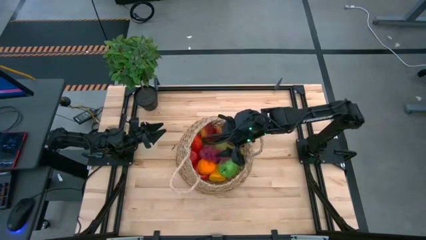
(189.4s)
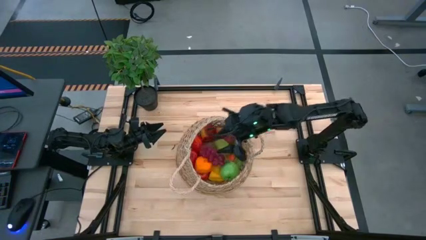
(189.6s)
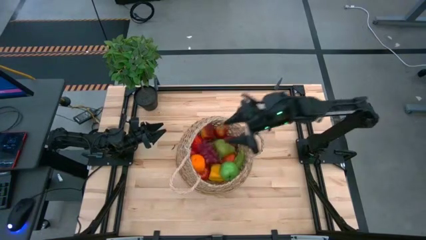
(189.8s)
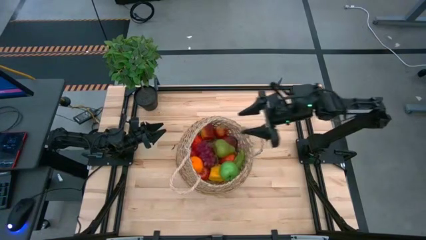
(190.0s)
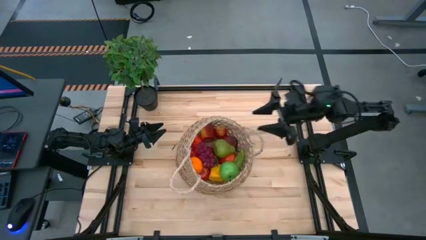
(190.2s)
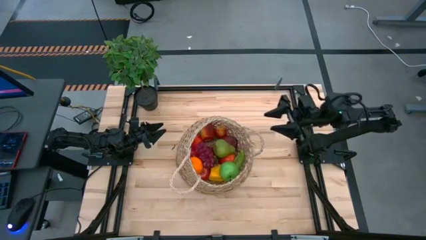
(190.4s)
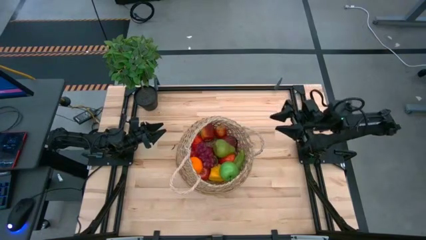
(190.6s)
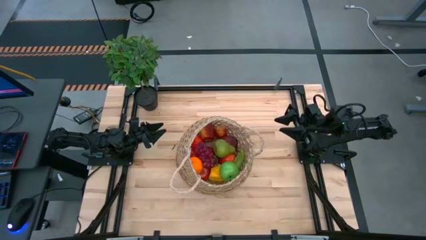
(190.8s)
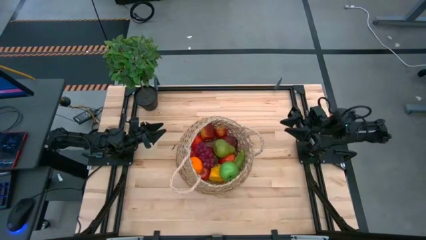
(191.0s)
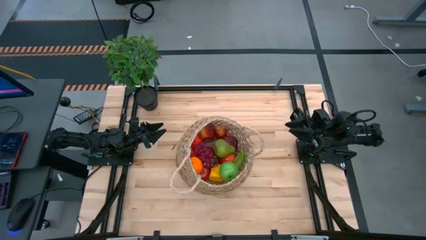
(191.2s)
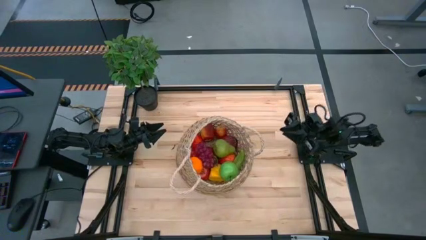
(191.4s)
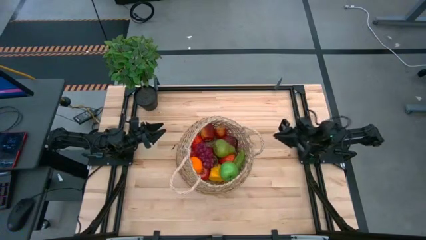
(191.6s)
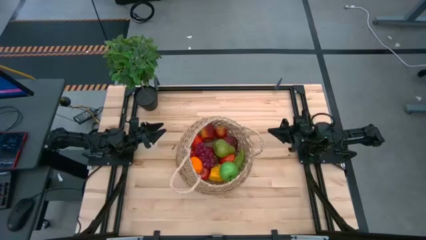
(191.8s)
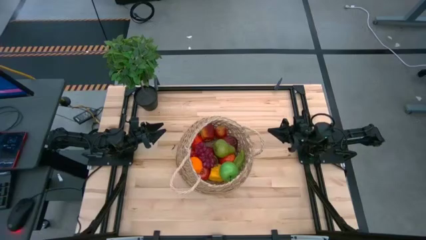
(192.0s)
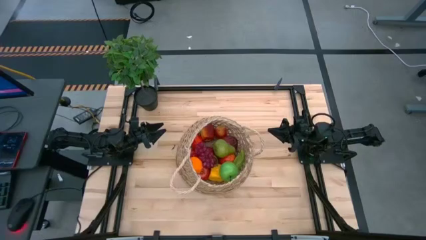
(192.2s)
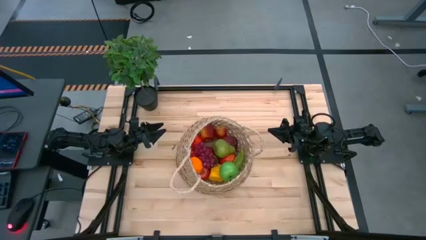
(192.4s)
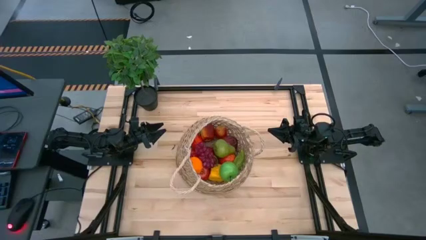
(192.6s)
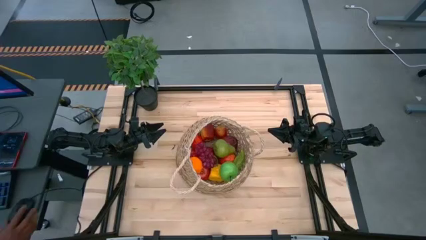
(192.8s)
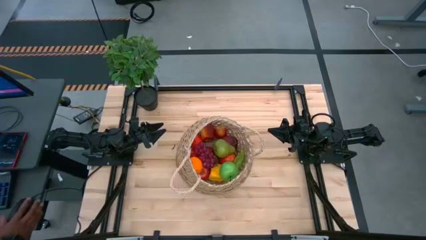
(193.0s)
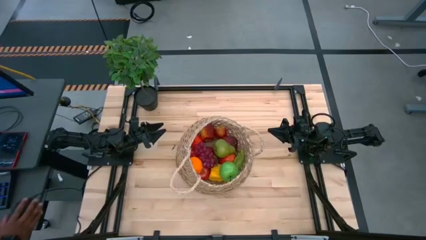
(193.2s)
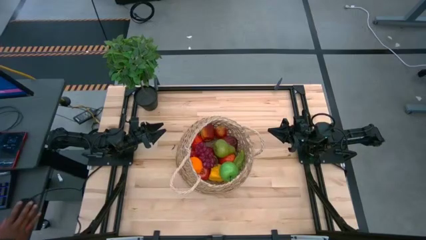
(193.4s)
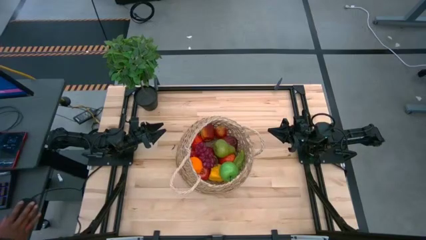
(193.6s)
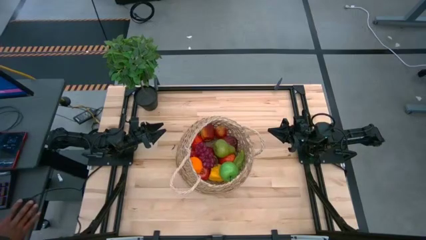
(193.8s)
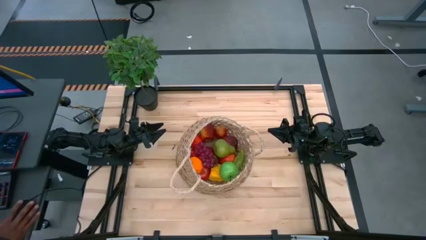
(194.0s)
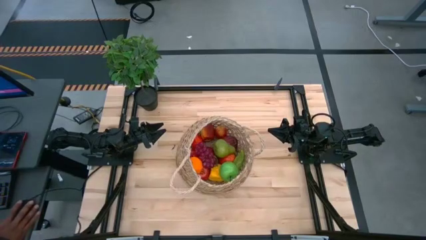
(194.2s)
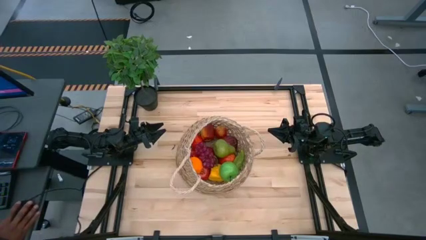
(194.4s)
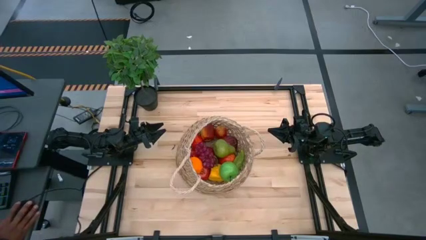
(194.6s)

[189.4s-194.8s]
Task: Build produce basket
Return to Home Position

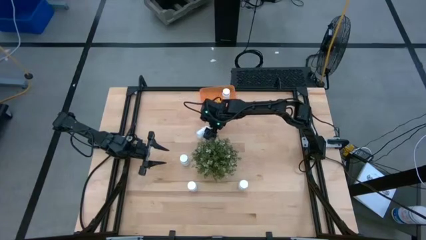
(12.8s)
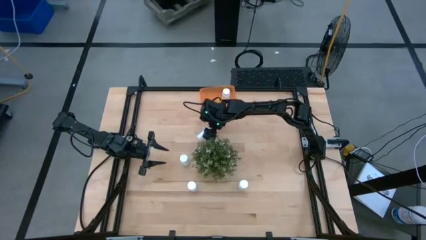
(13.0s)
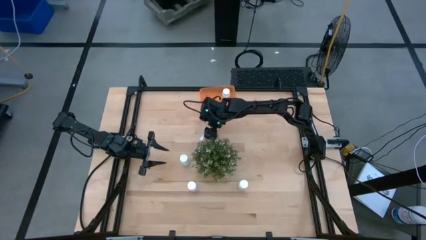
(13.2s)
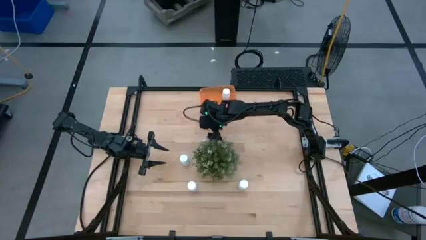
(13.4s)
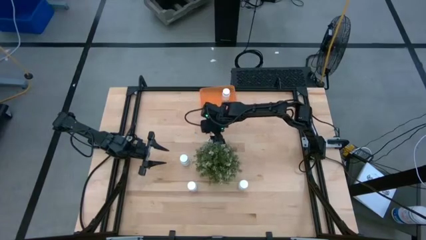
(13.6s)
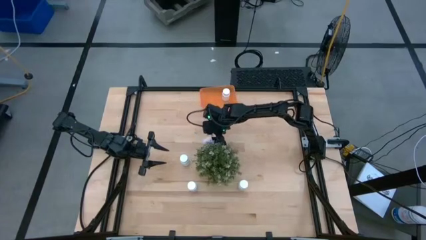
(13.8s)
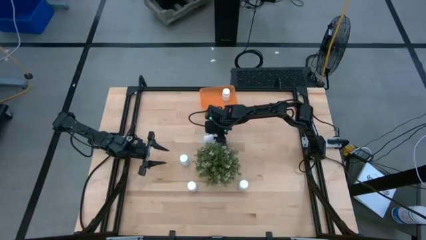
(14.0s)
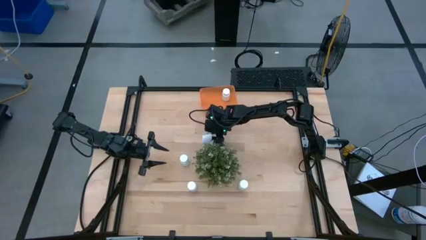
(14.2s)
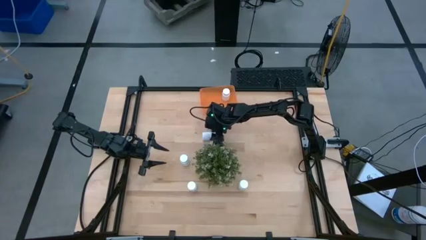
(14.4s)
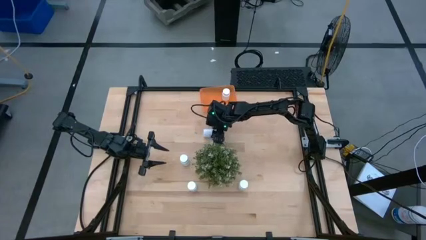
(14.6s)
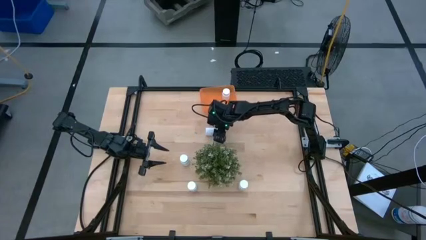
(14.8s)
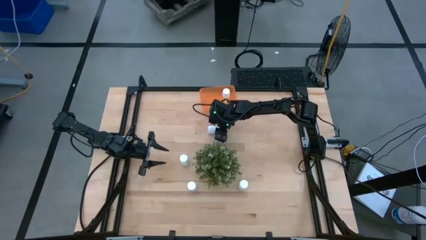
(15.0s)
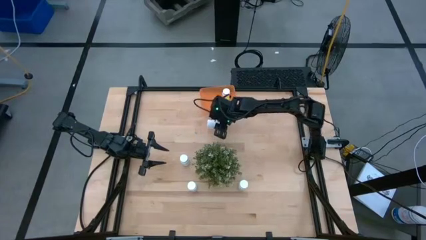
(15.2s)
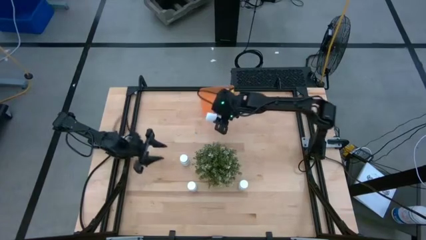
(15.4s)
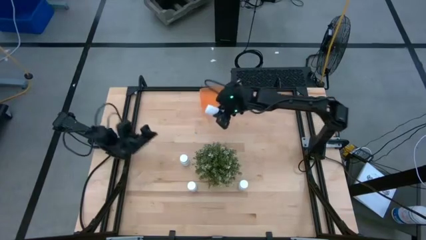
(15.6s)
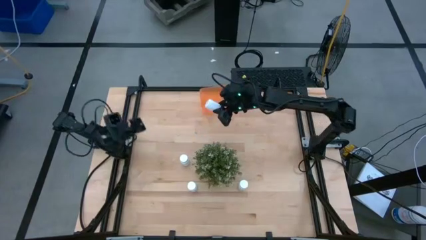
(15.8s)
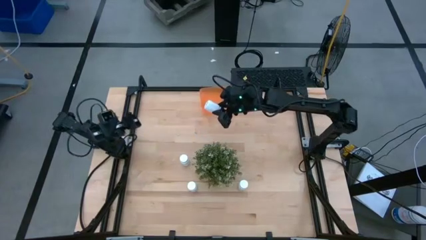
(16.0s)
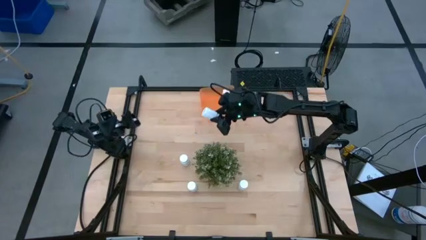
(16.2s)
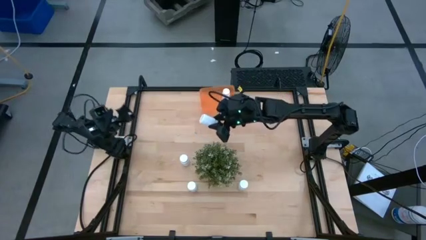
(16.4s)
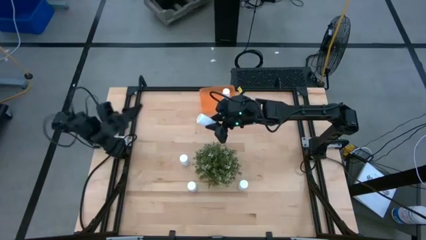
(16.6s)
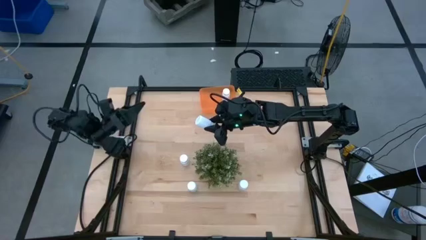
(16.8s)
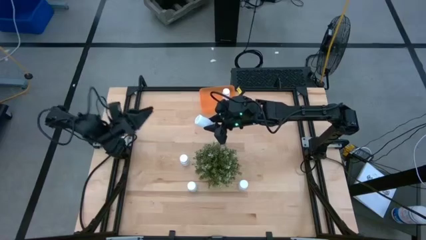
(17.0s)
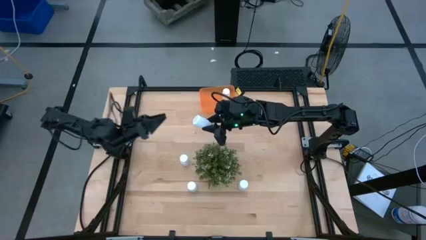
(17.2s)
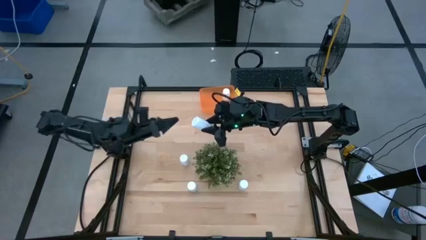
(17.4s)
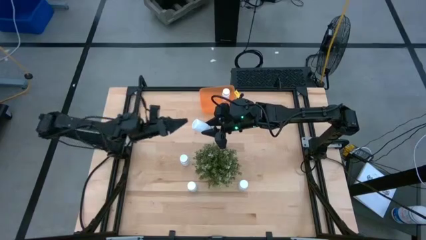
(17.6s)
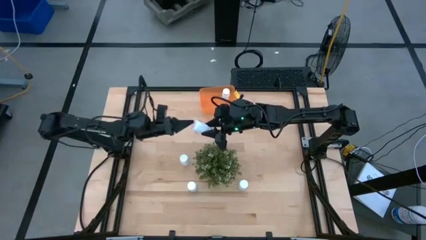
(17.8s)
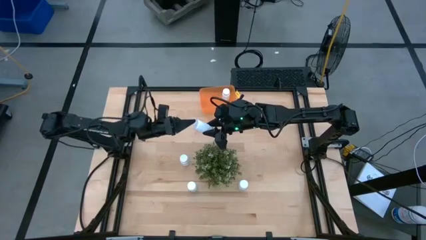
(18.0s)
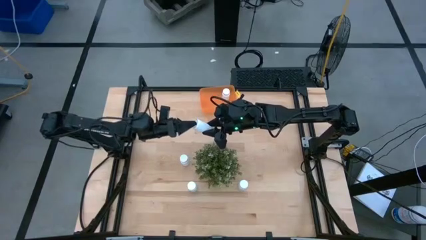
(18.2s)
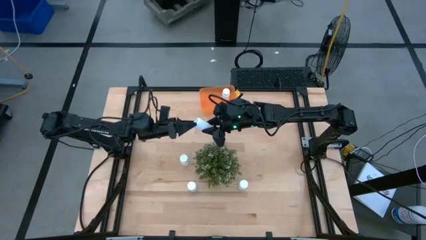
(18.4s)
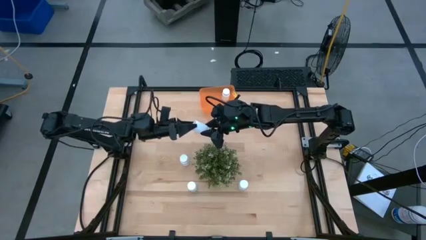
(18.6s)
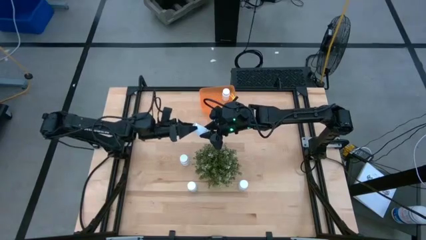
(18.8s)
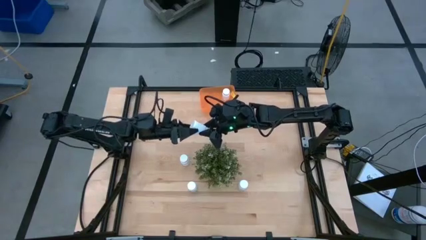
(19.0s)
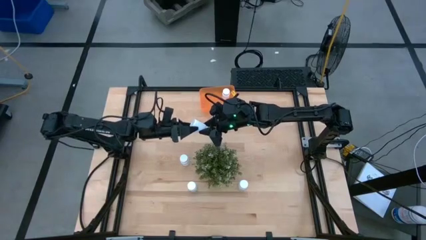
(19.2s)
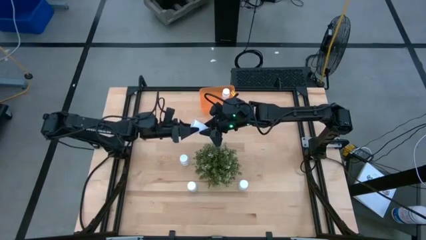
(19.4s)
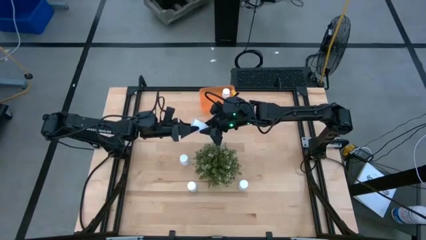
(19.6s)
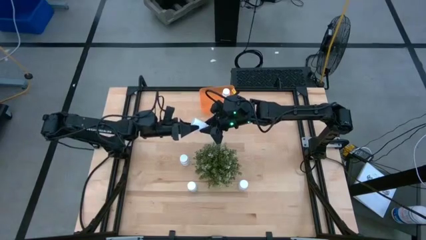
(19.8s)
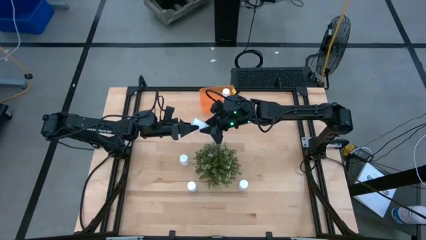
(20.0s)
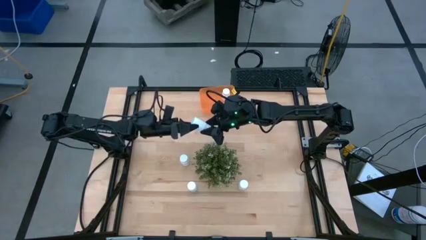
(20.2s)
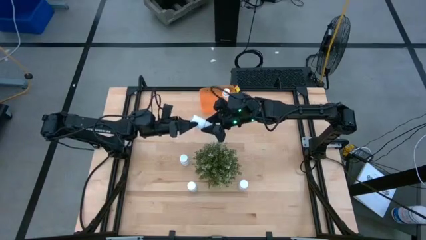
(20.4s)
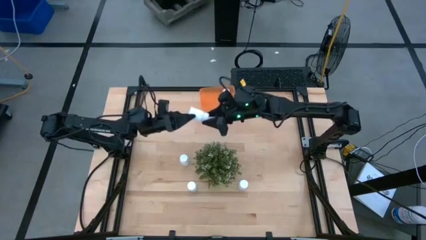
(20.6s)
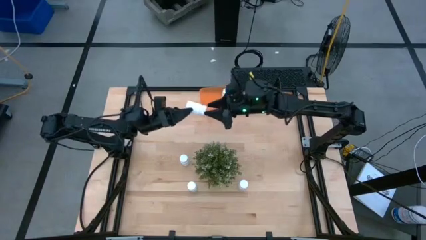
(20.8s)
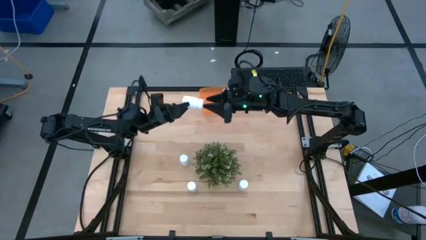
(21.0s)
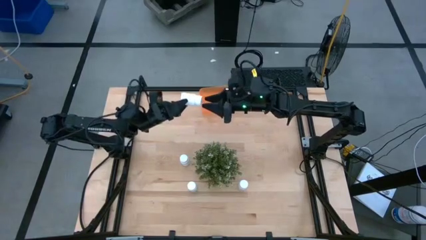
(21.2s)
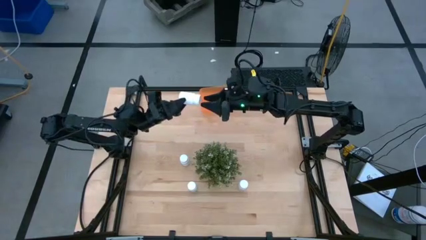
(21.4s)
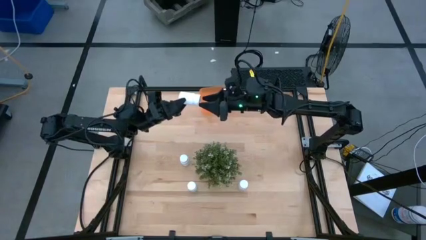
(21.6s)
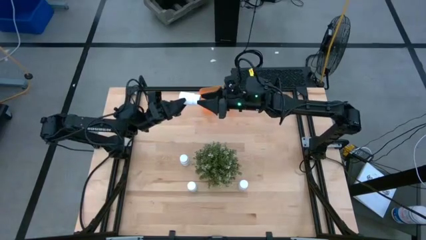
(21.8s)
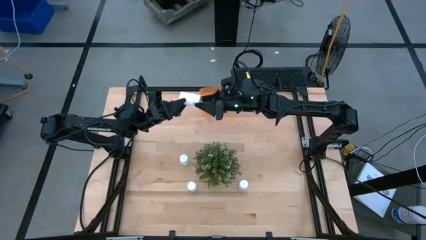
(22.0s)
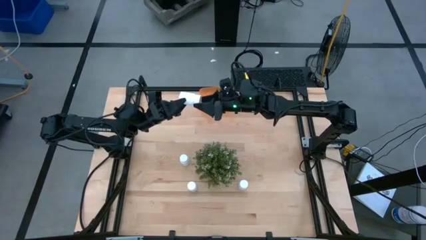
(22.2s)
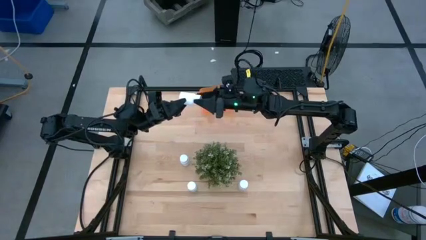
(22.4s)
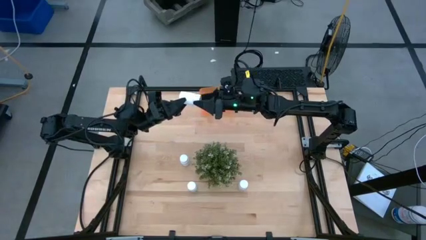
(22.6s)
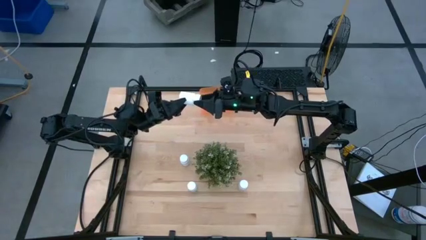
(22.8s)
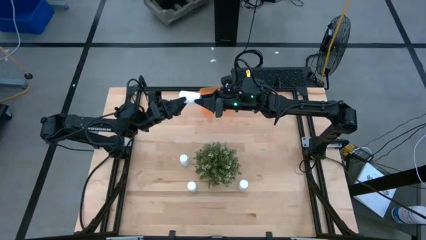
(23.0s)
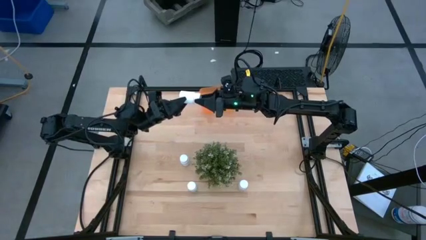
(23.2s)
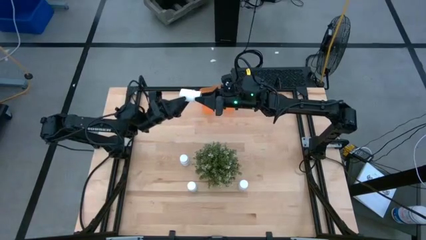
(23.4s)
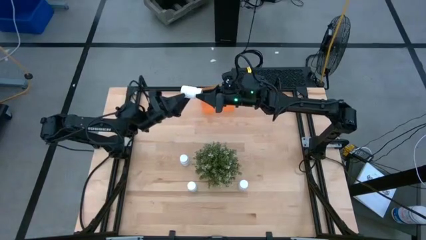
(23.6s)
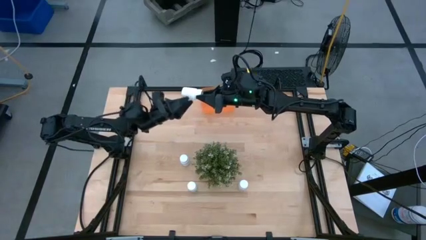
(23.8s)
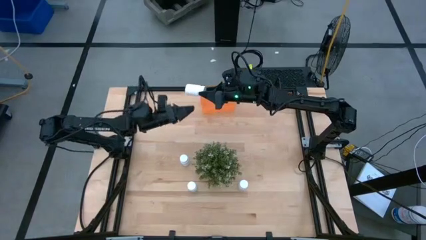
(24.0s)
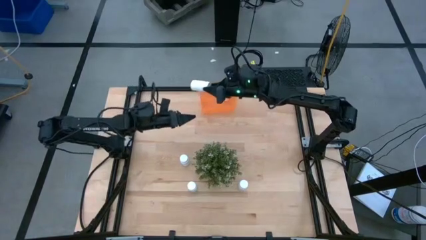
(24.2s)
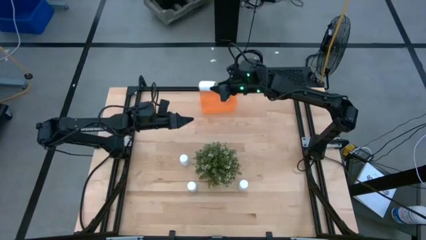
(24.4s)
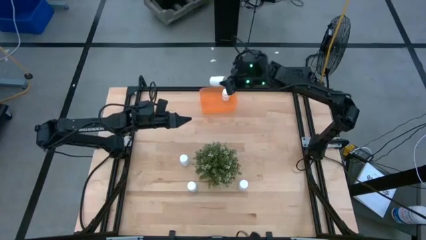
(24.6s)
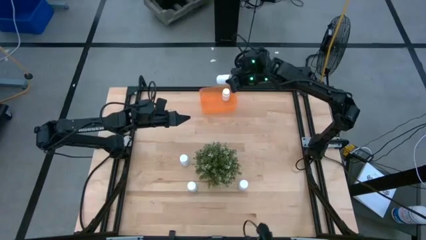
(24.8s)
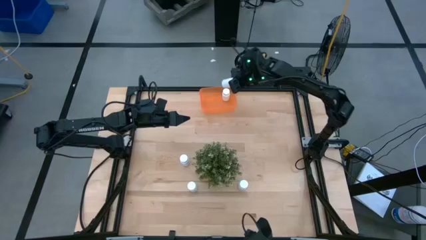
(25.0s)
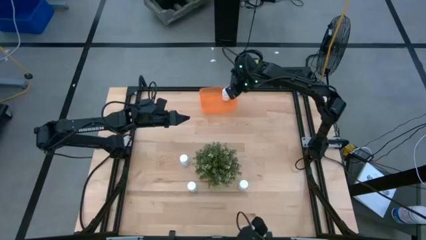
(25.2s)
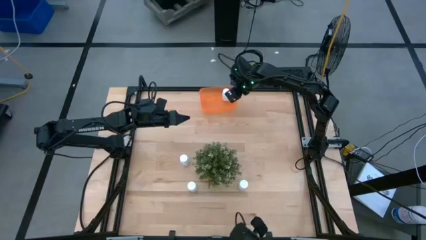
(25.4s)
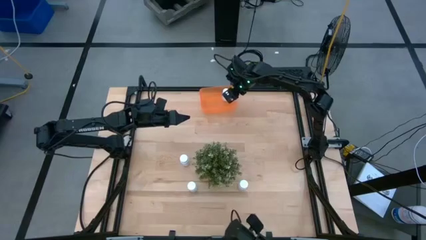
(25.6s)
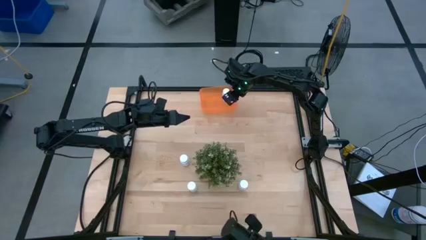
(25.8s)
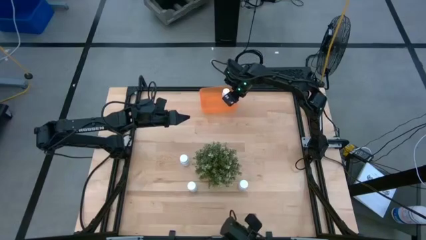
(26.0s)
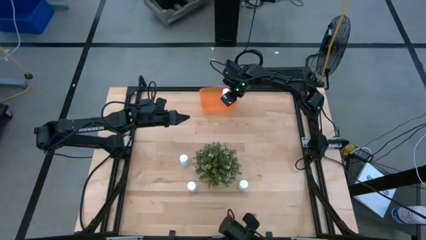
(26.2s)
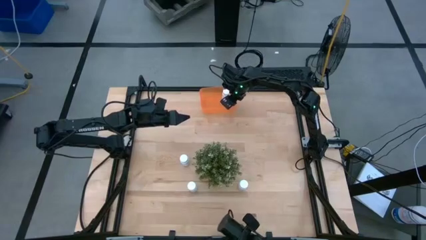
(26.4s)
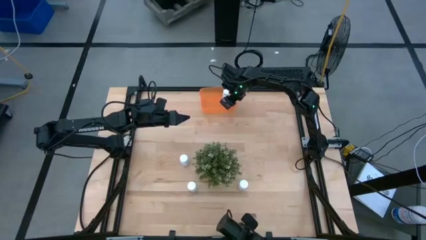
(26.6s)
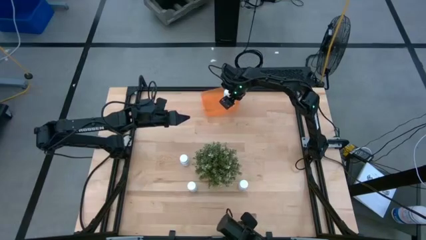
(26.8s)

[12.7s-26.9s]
Task: Pick and place pill bottles into a basket
Put the white pill bottle into the orange bin
